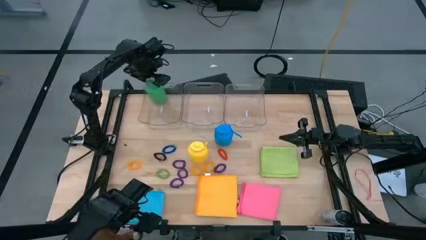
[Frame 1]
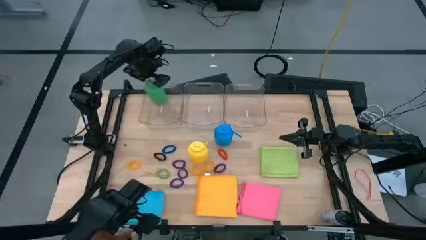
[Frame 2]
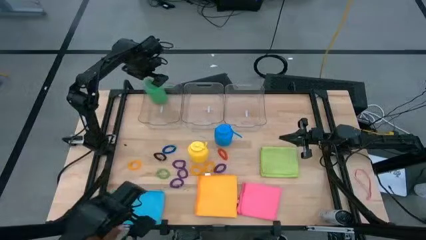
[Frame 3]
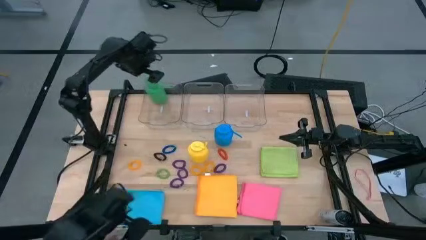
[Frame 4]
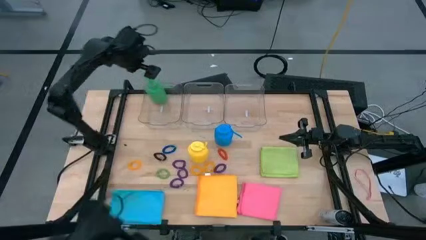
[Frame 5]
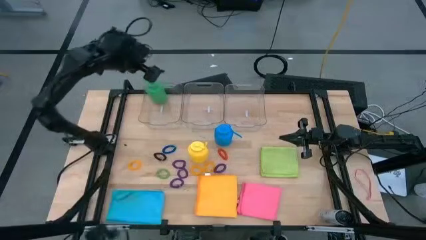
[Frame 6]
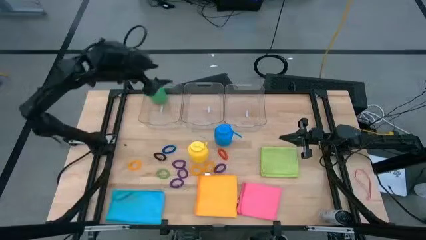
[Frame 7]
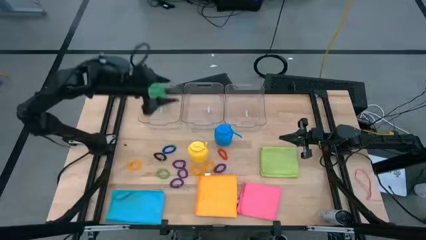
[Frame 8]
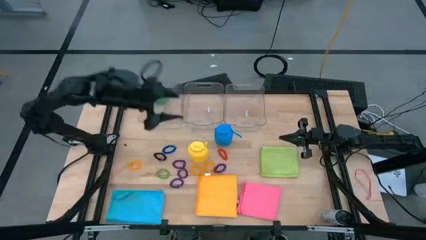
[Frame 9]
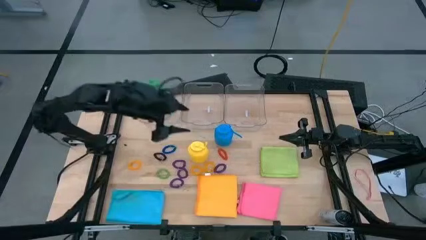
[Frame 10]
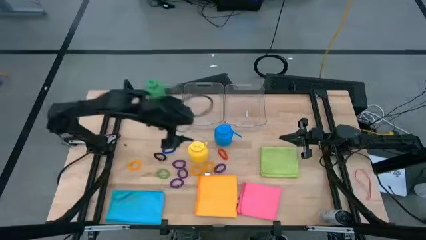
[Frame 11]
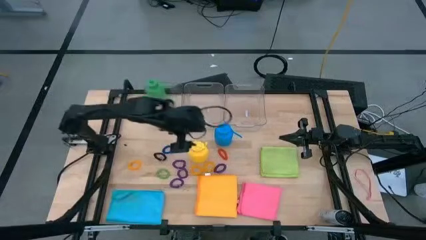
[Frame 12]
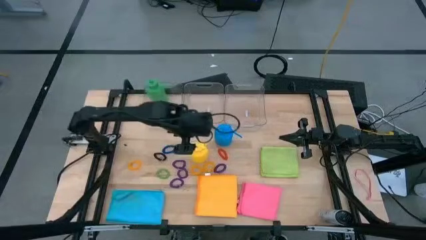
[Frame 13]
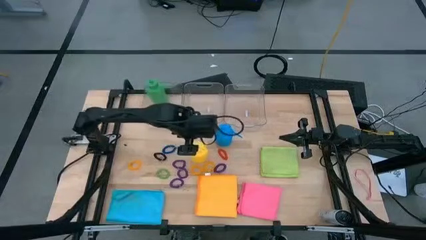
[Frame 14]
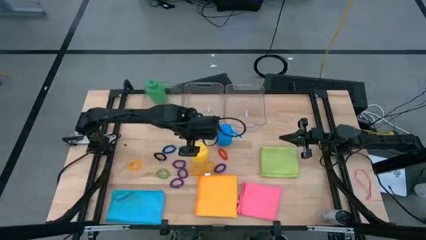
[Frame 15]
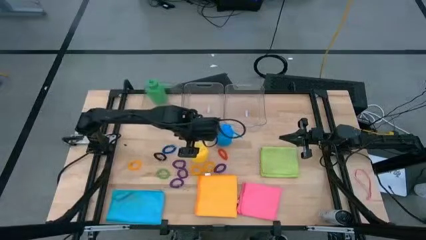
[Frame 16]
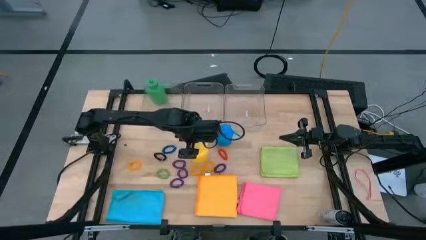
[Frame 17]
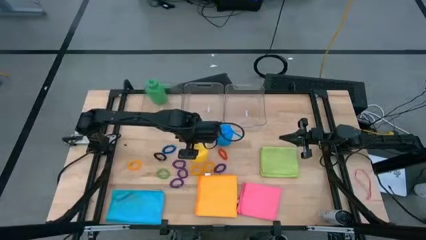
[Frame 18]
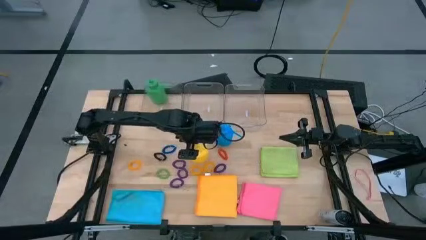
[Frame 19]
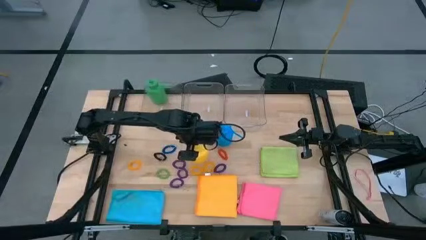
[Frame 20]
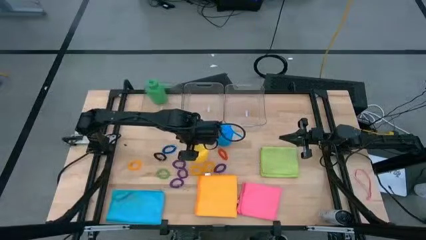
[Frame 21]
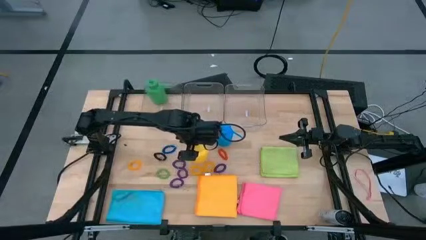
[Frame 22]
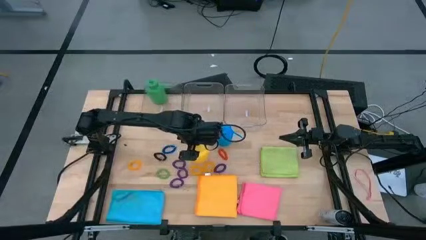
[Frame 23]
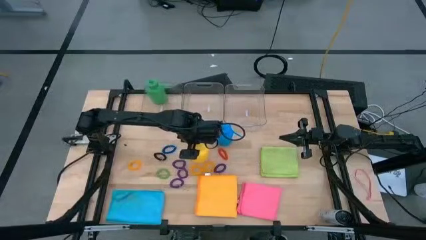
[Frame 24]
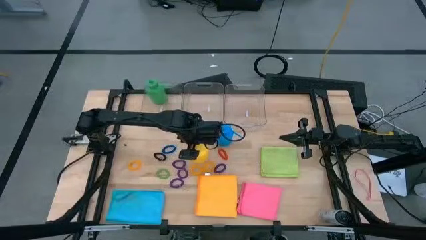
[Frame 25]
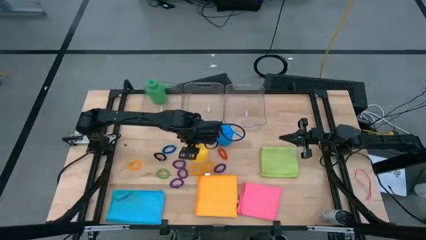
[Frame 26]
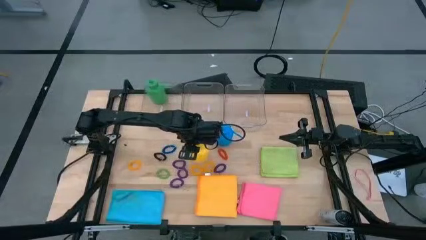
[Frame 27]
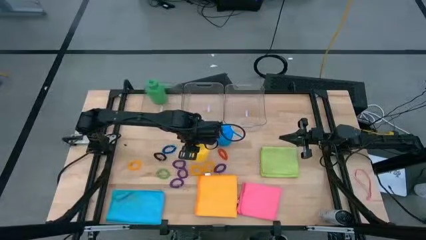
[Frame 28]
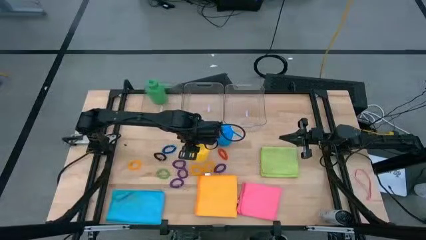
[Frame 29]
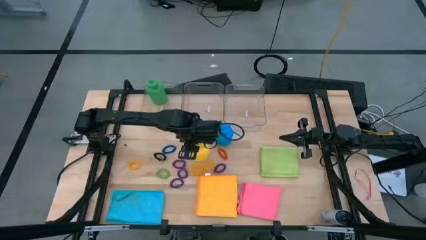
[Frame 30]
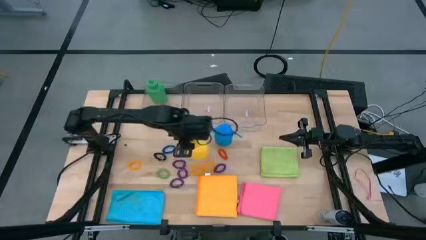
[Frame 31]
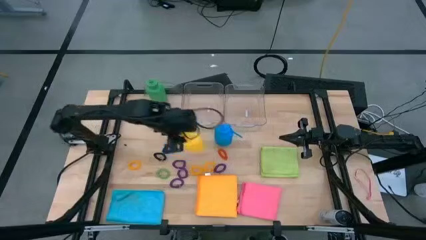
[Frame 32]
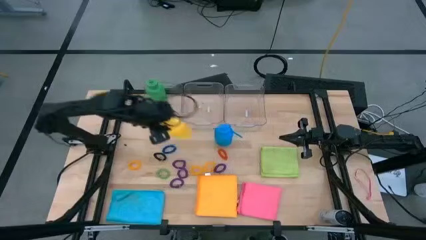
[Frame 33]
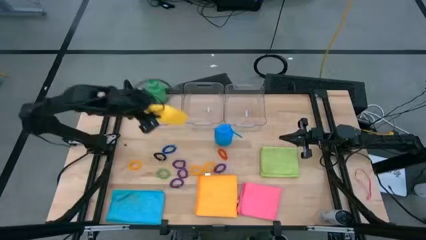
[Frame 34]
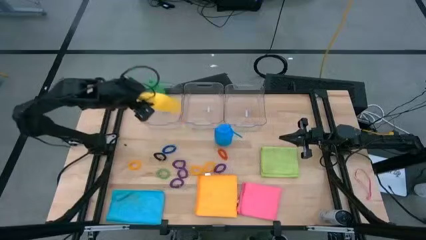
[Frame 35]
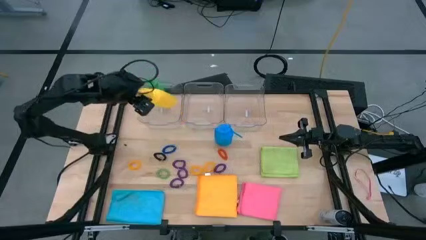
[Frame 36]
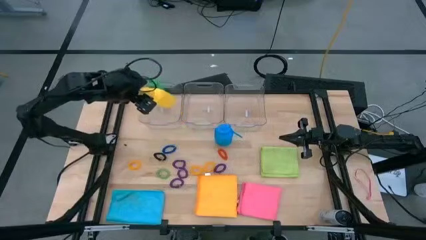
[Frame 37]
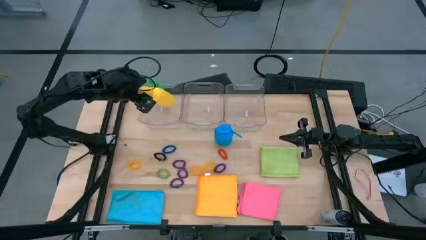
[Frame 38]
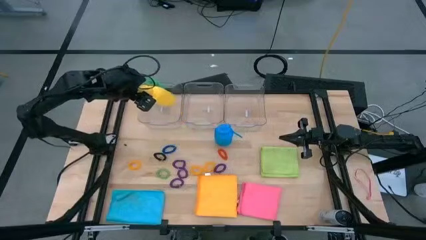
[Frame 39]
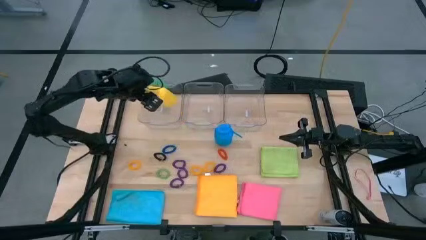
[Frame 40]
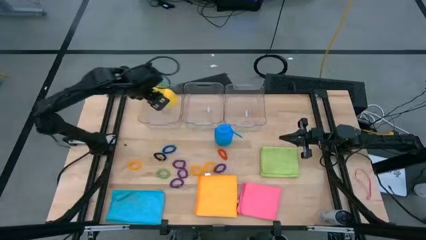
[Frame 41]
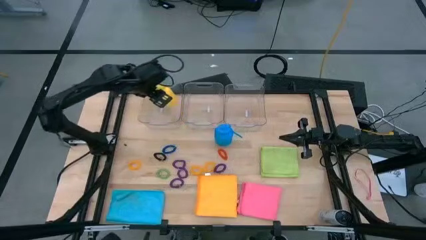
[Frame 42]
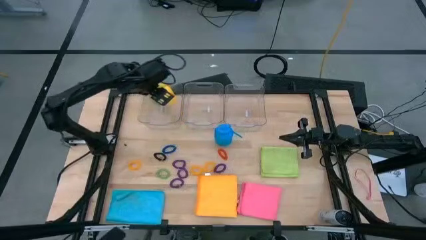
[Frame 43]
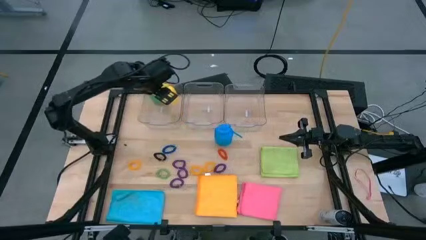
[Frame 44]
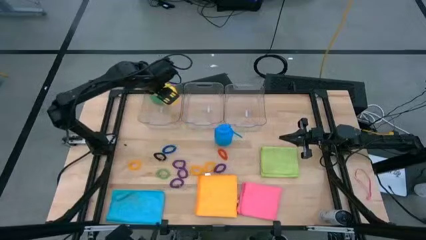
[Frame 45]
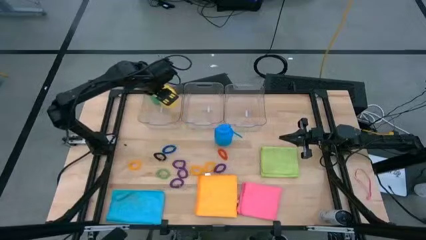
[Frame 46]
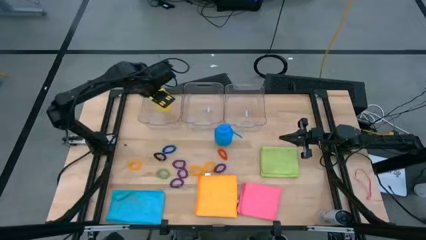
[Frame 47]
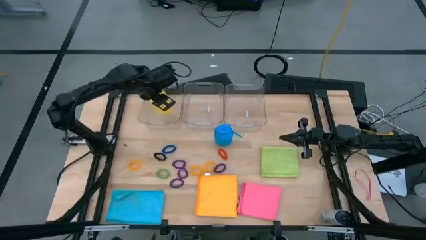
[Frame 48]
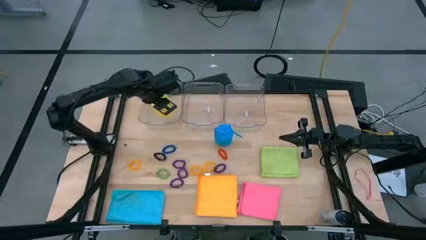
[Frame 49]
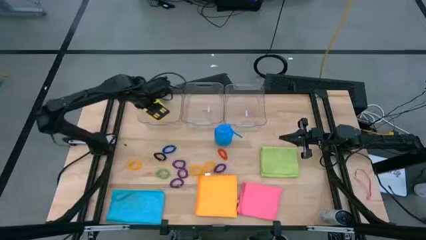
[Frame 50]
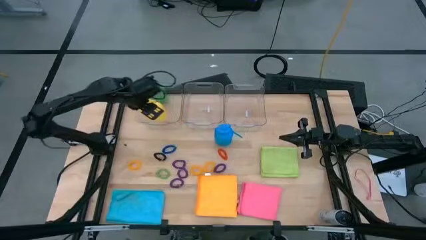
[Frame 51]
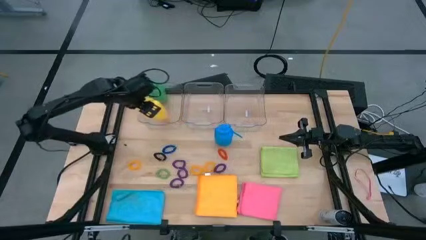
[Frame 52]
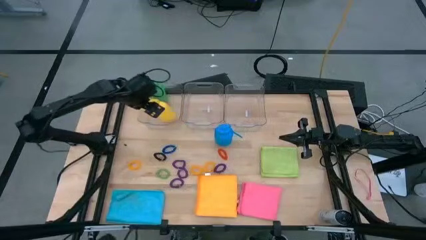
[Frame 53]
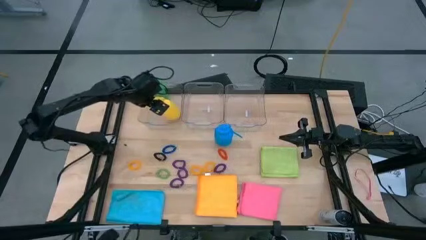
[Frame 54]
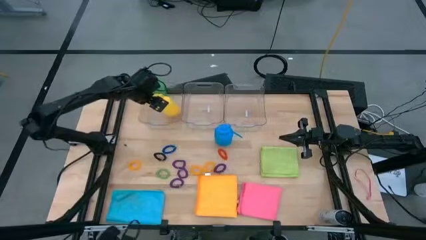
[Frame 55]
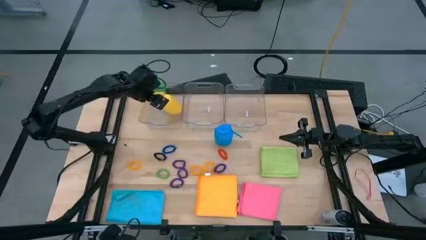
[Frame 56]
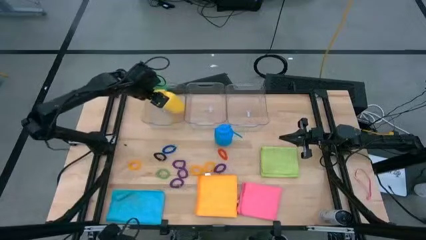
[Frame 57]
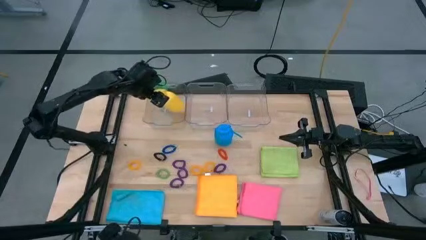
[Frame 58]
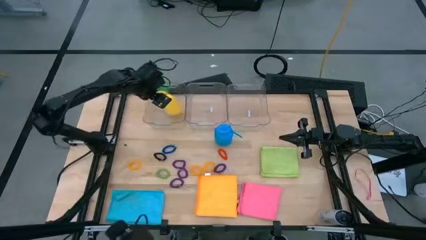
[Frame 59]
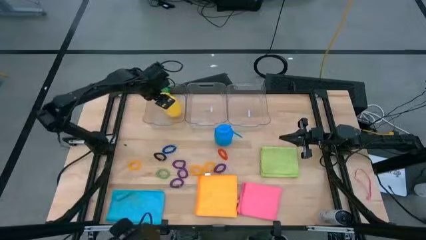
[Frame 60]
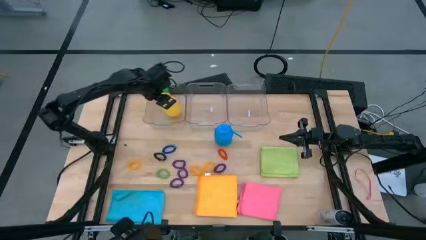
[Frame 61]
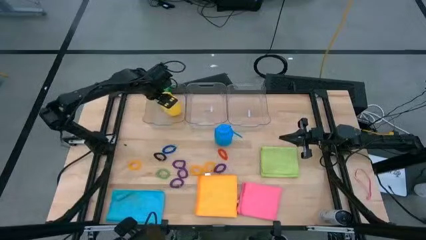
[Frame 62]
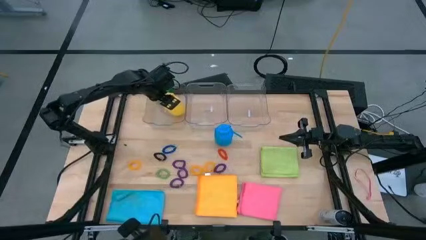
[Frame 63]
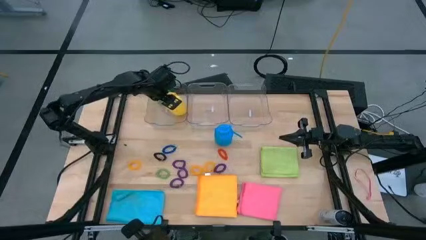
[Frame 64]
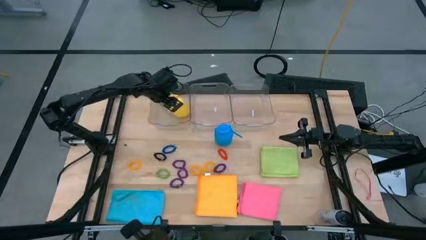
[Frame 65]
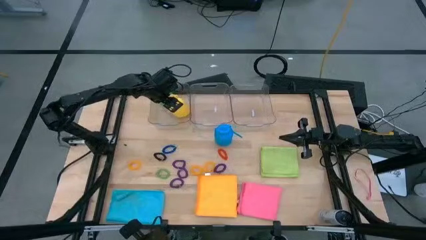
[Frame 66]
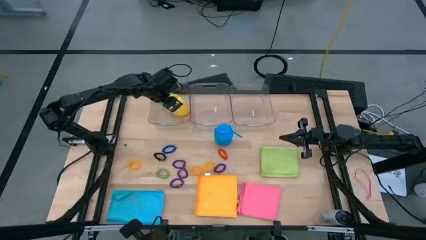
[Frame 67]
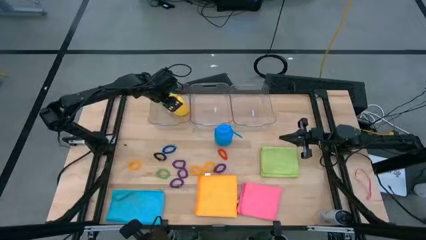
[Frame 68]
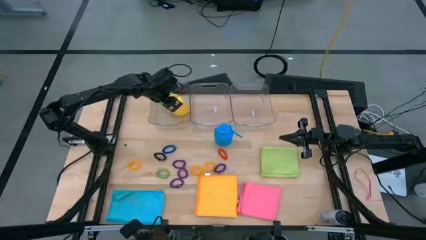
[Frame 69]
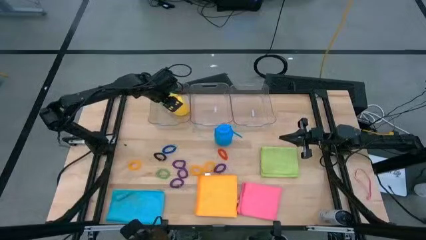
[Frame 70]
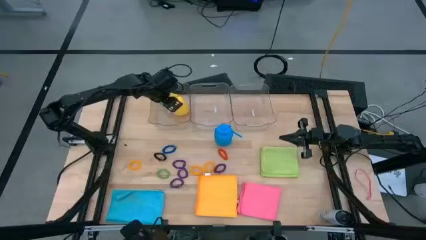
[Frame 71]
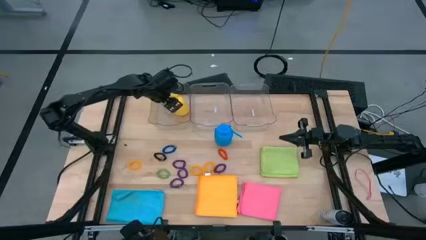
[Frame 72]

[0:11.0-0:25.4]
Task: Pick & Place Sports Items
Put the yellow tumbler into the left transparent container

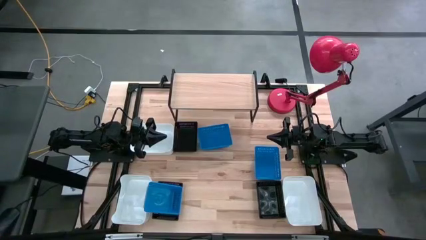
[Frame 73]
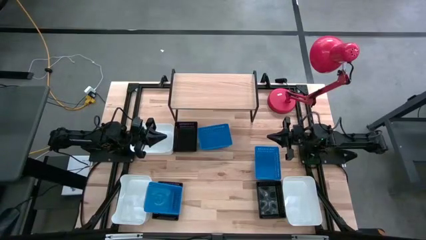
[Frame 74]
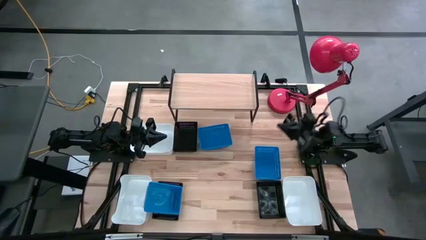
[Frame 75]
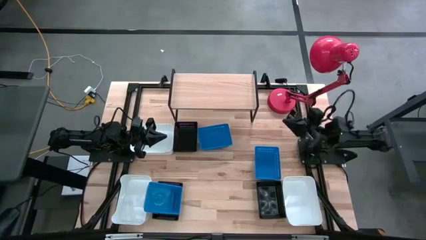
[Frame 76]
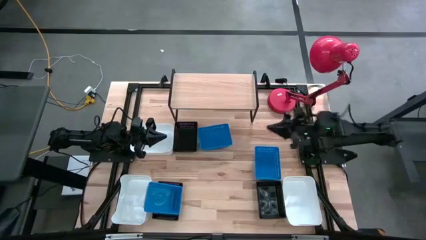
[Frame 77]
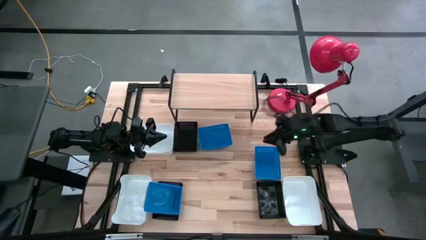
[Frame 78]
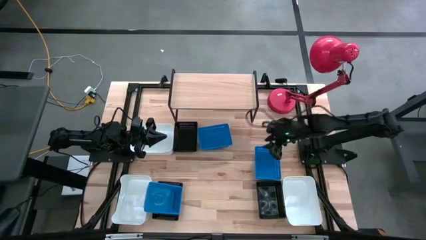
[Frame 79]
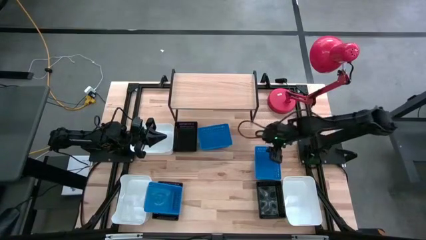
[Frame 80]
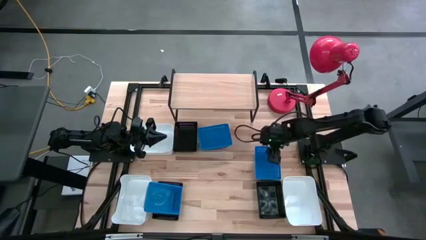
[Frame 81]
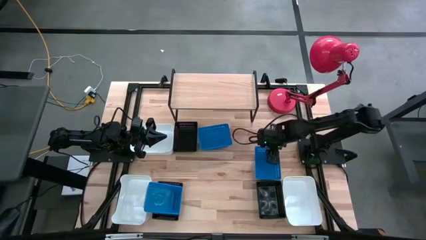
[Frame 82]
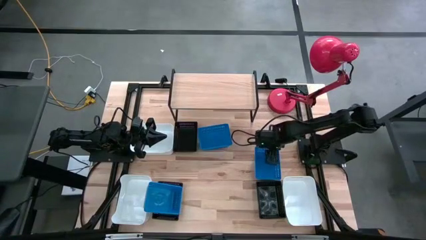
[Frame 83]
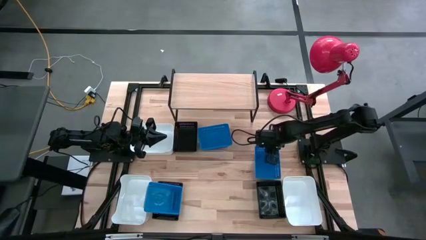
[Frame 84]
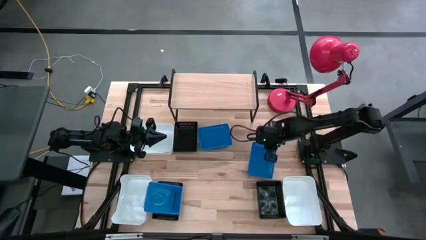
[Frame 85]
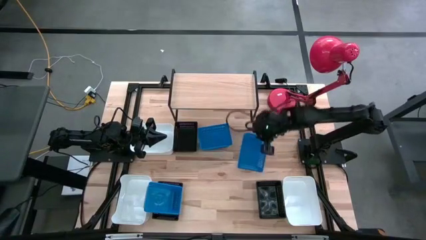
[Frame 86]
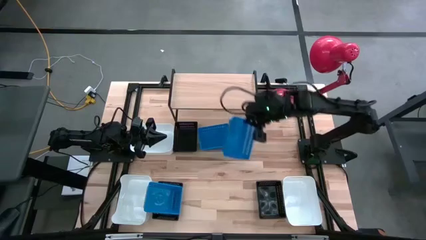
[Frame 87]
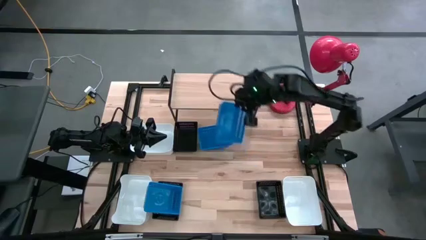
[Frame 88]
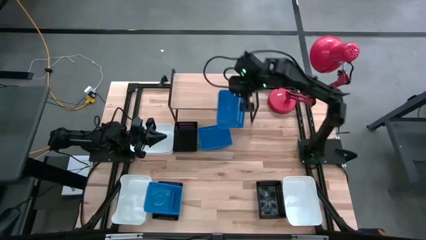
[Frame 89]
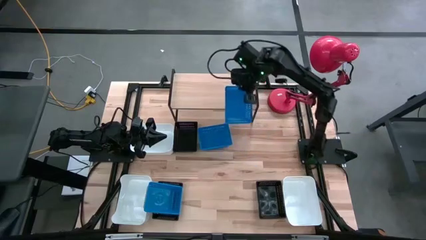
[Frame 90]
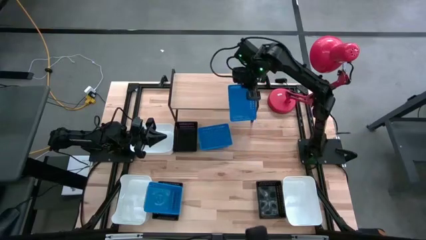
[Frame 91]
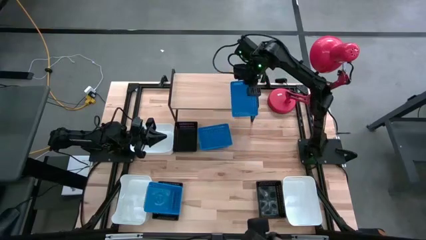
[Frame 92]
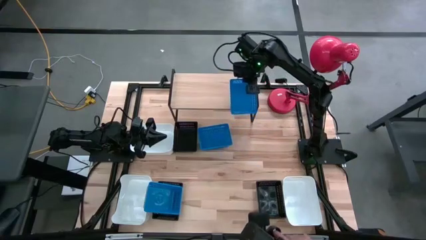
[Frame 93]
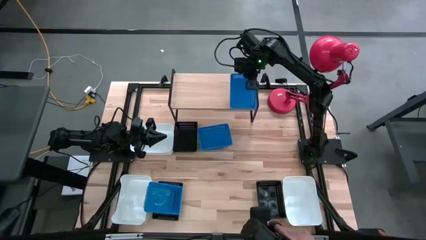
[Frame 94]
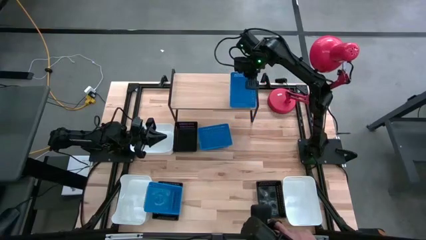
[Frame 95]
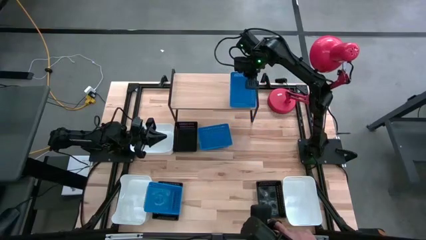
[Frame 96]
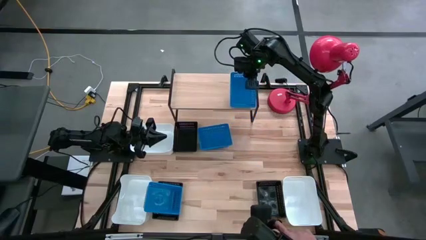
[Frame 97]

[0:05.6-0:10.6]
Task: Stack baskets on shelf by color
Put the right blue bin to the right on the shelf
